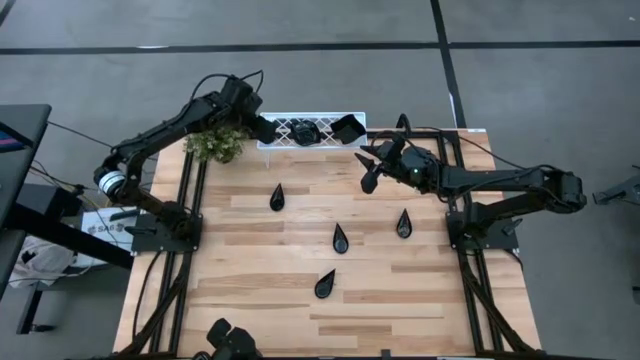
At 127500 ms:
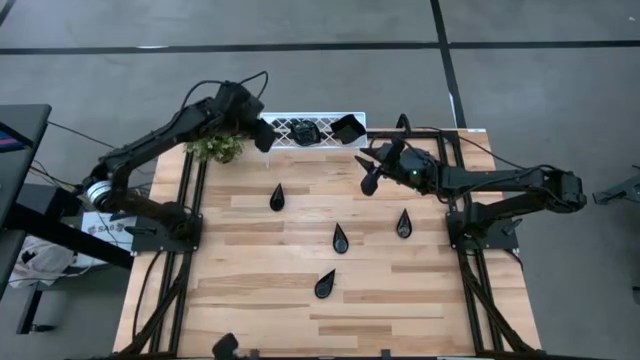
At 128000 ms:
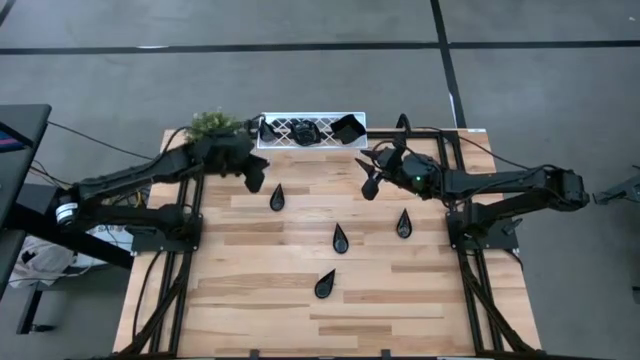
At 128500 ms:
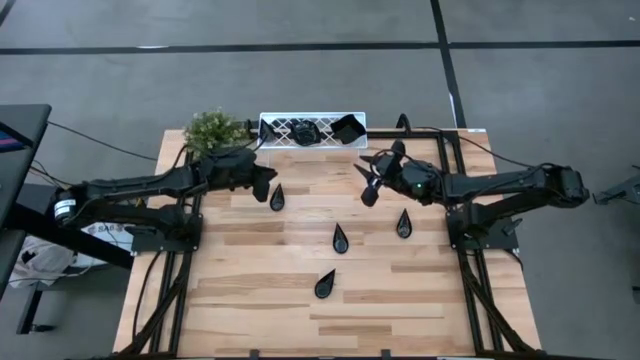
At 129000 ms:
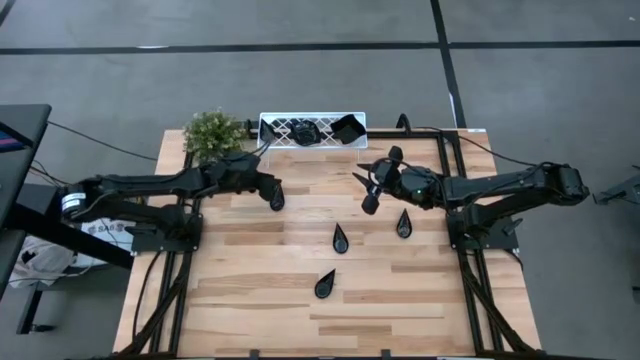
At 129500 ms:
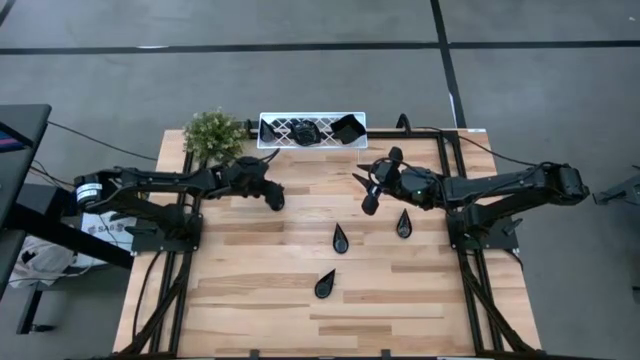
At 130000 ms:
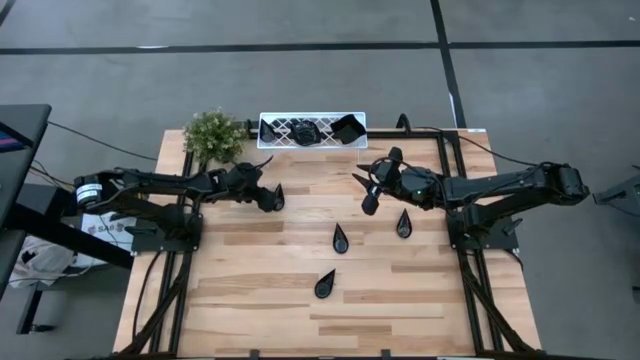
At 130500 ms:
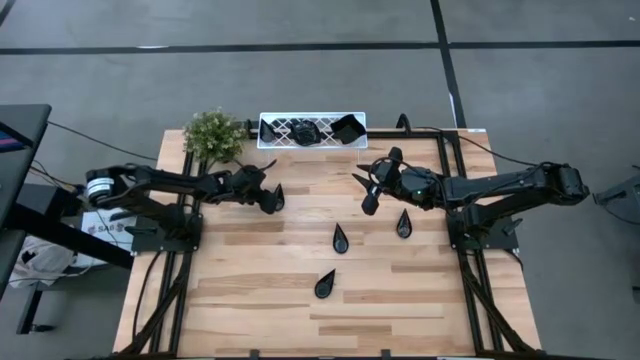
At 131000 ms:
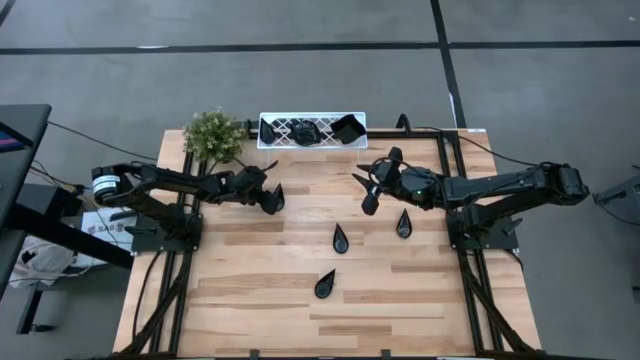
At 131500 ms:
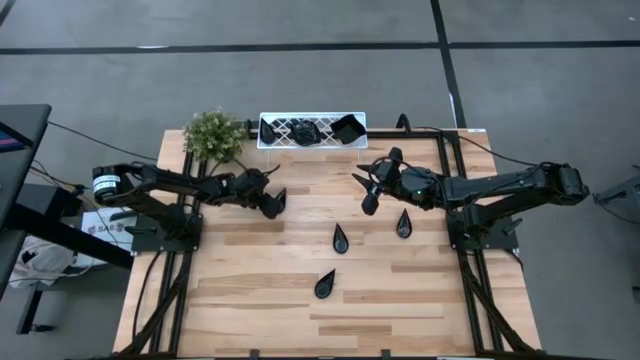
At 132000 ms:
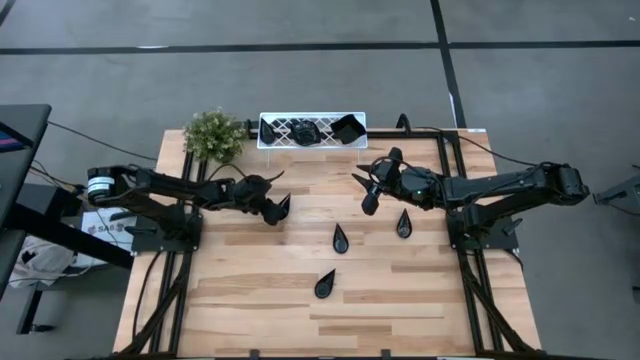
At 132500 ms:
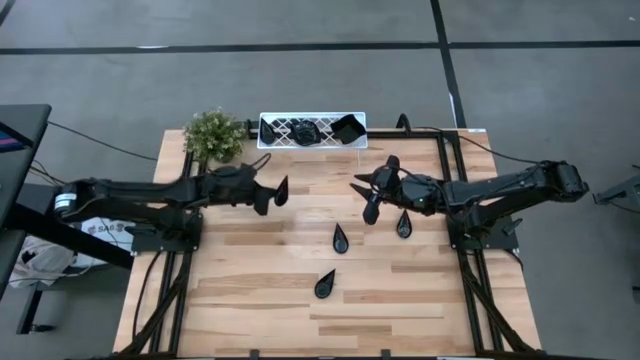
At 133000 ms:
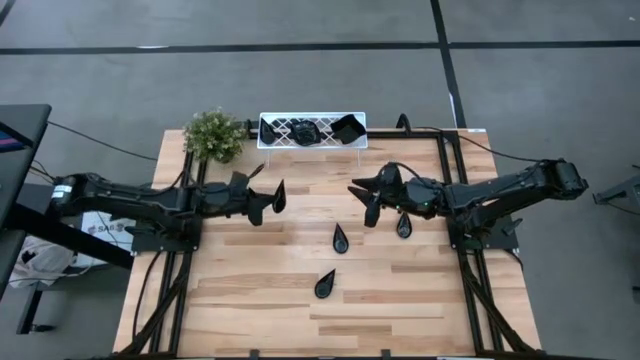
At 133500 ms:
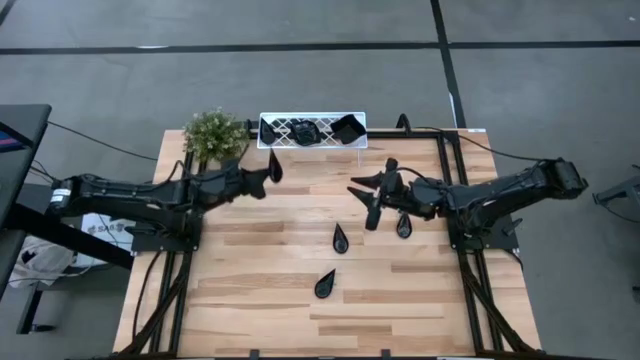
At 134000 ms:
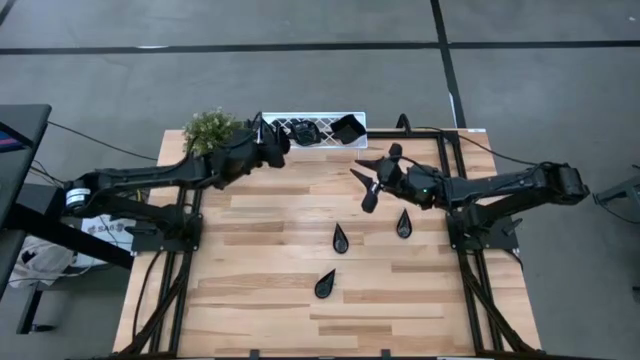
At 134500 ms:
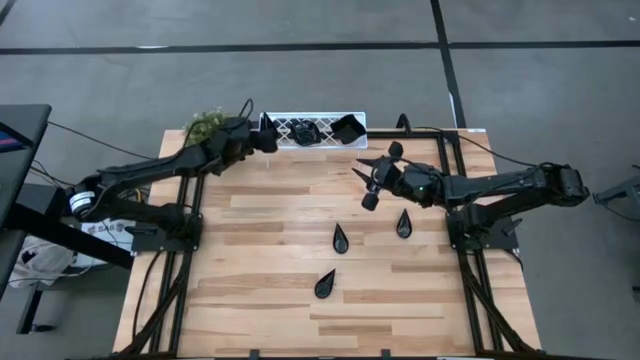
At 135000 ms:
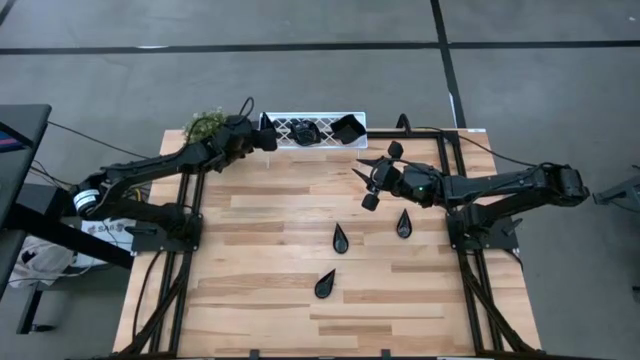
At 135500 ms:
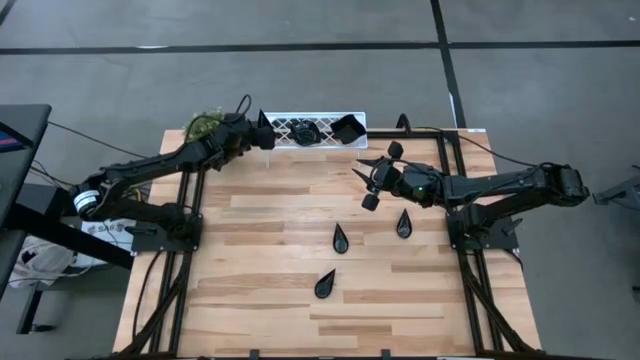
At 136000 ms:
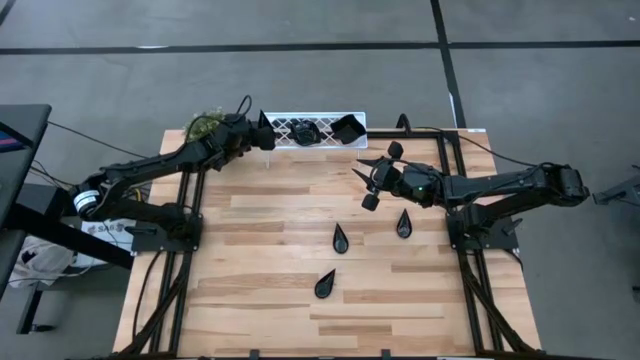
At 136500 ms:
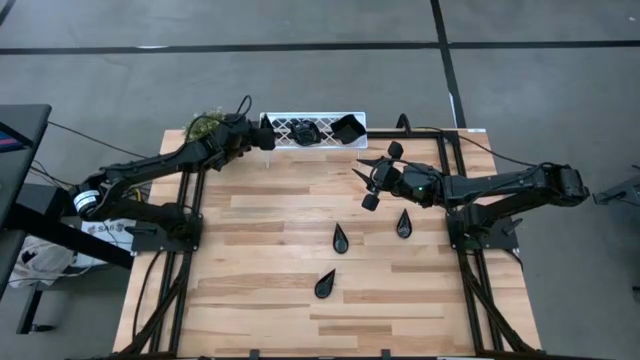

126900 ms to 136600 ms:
Task: Pick & Place Mini shaped plates
Stack the drop shaped plate on the top of the drop shaped plate on the shelf

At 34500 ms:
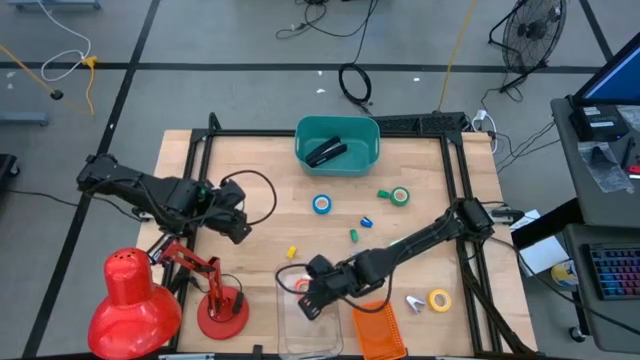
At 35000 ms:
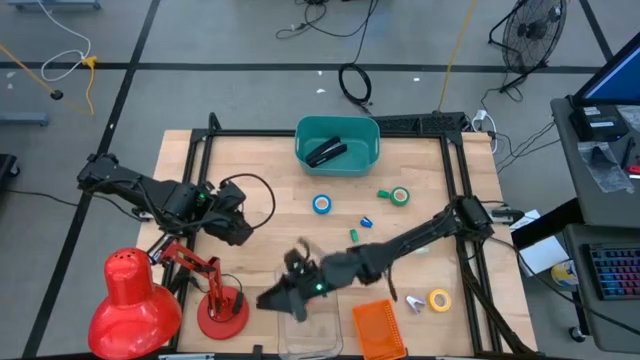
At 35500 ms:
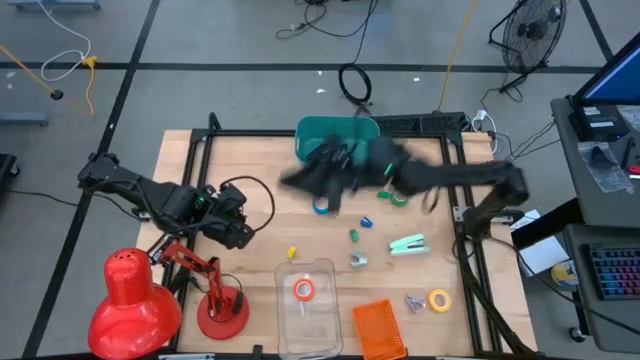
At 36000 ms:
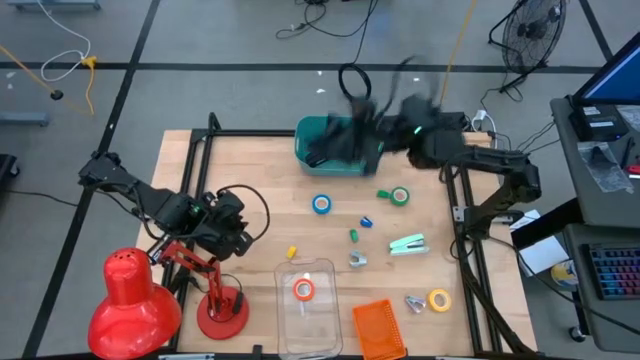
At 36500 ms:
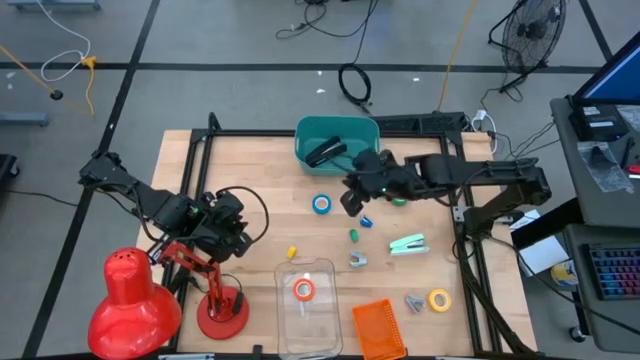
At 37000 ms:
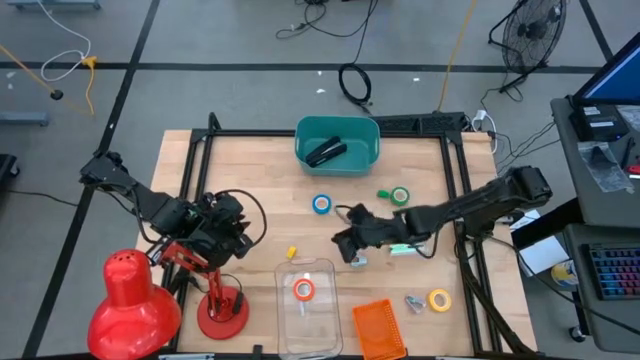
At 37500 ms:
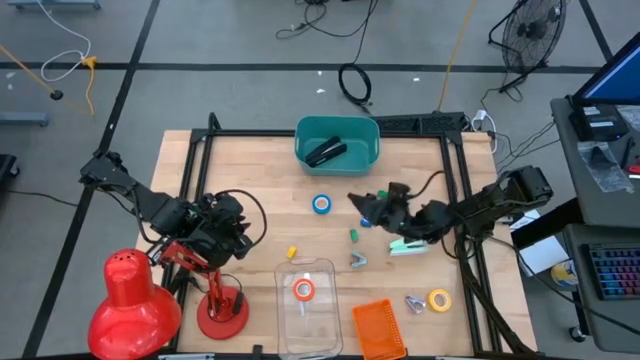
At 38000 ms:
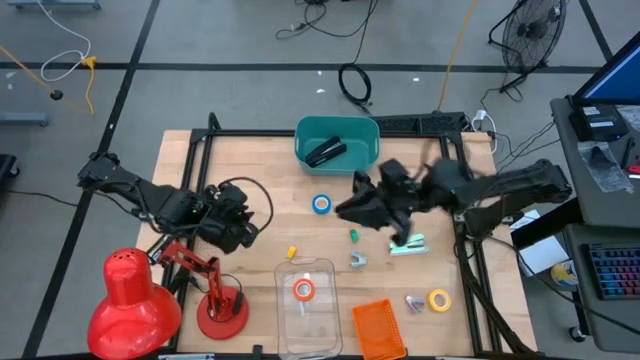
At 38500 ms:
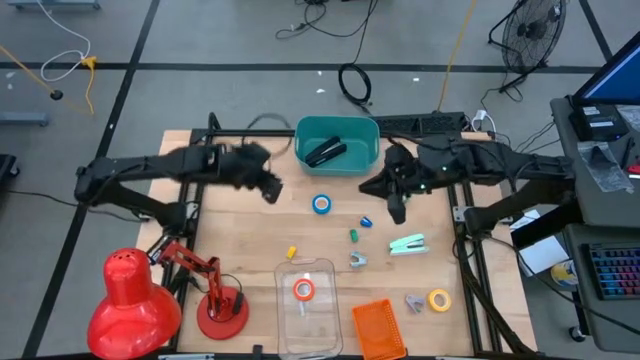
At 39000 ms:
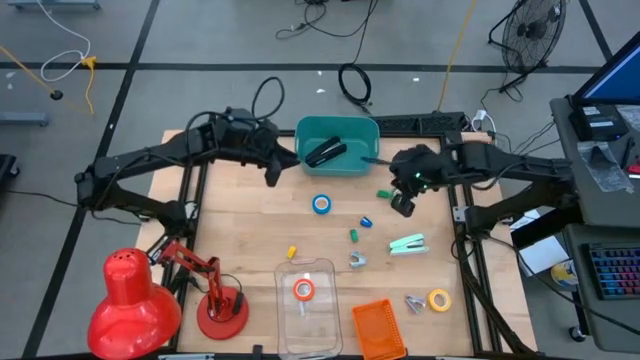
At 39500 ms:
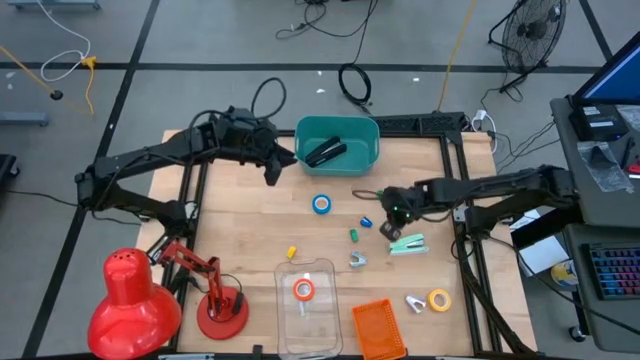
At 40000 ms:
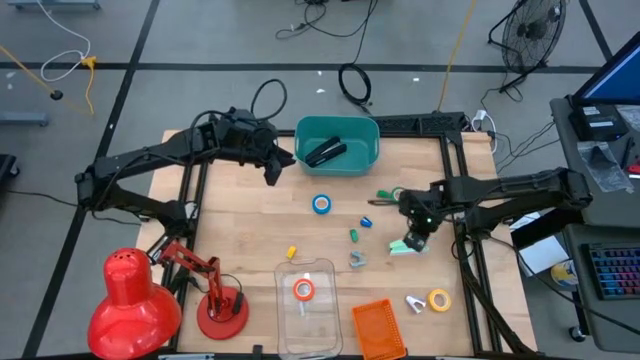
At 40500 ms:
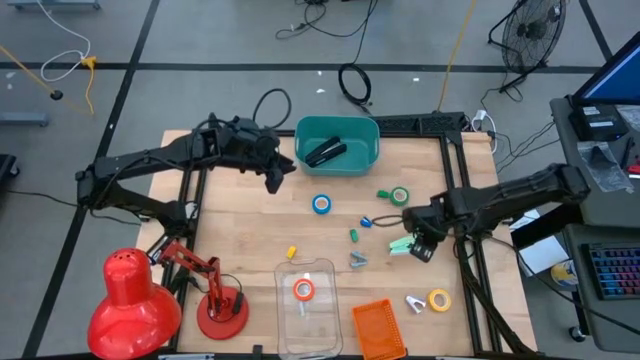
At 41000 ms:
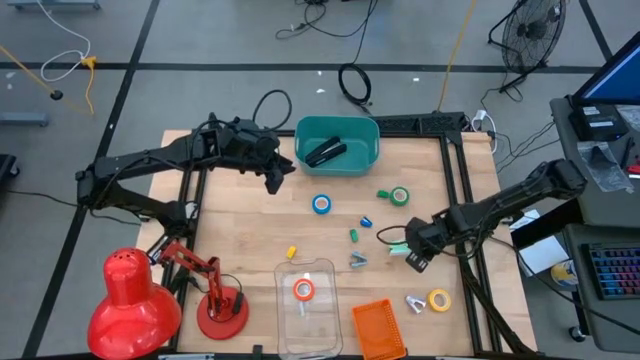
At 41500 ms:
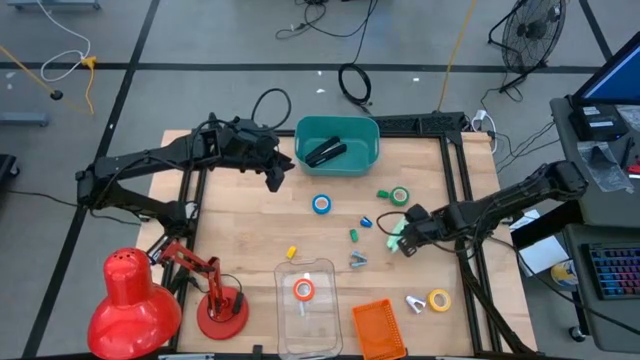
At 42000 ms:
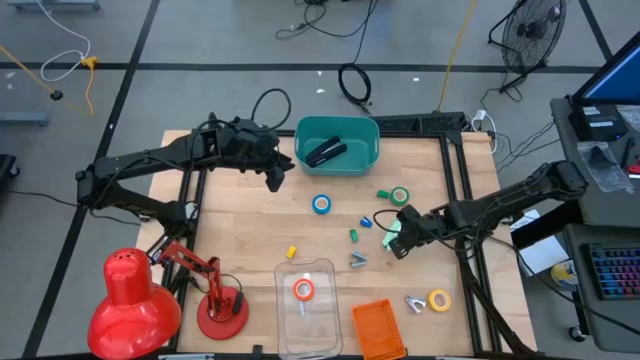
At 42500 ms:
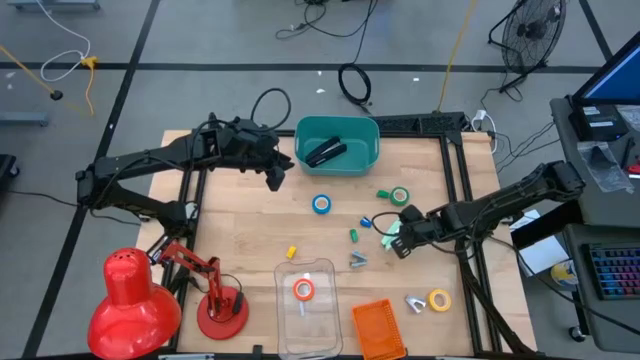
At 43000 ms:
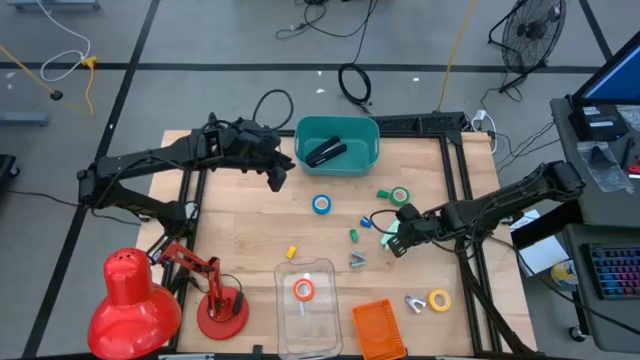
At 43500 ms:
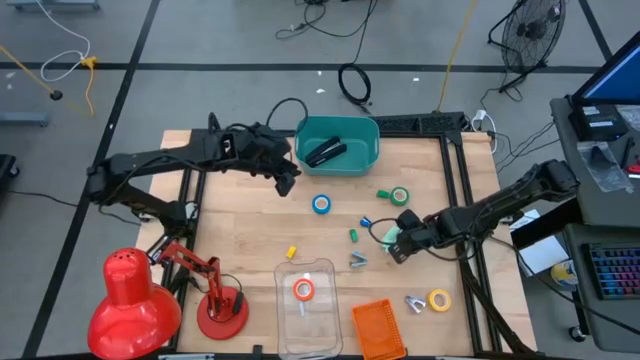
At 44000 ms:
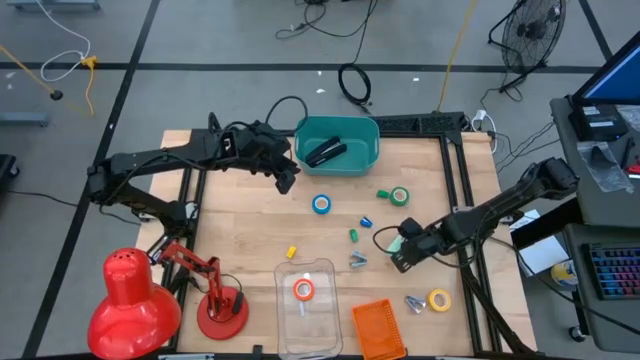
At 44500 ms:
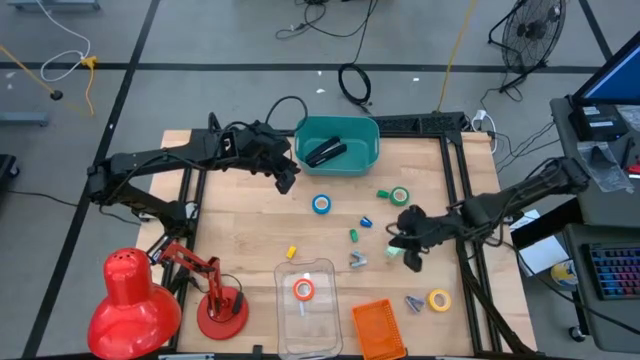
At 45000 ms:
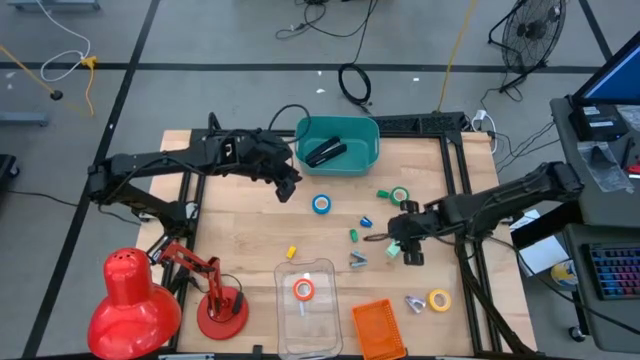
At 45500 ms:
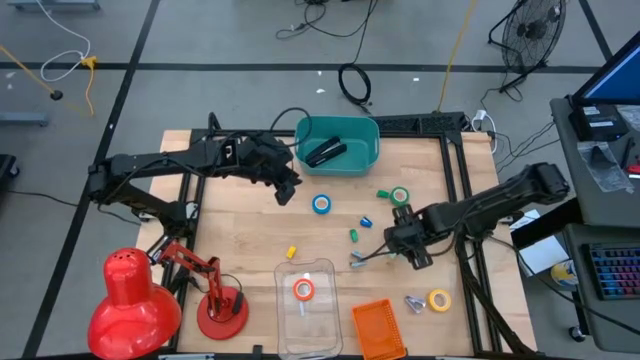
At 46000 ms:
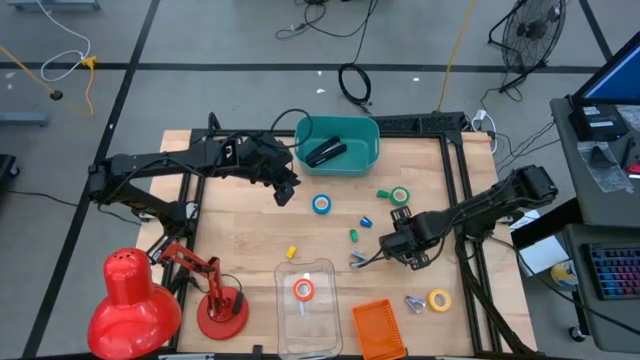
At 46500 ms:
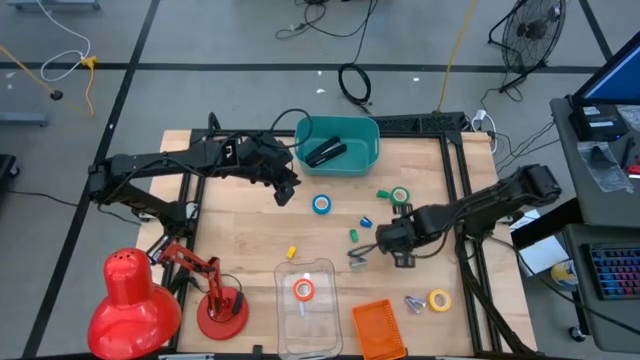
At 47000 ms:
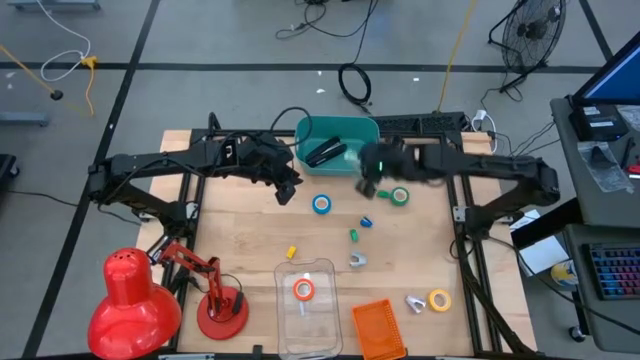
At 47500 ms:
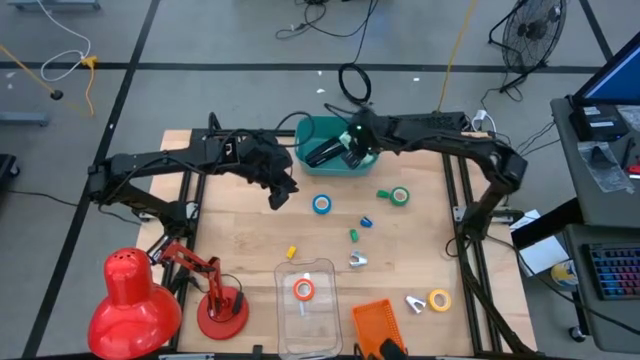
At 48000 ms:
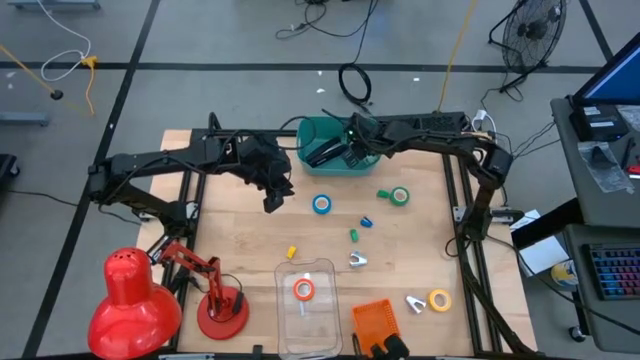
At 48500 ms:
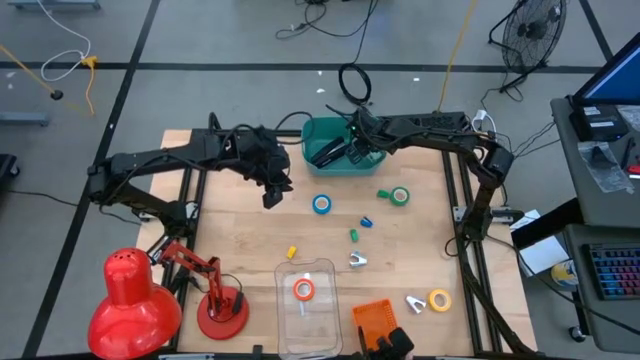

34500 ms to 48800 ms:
Task: Pick and place Stapler, Stapler remover, tape
Put the light green stapler into the green bin
